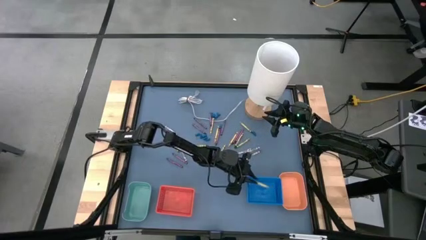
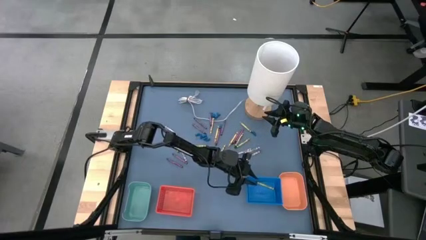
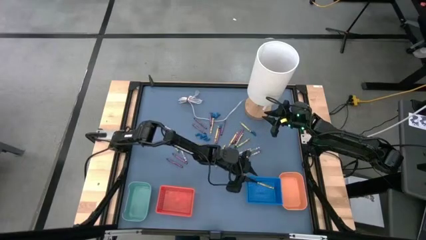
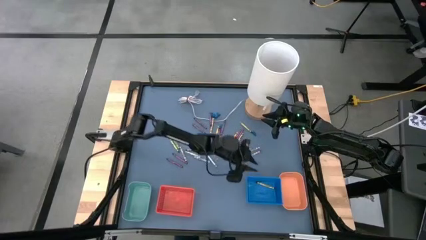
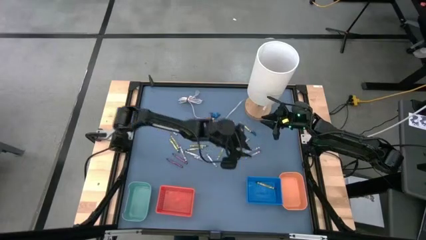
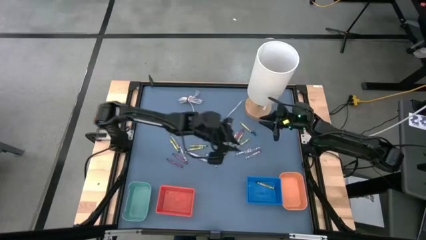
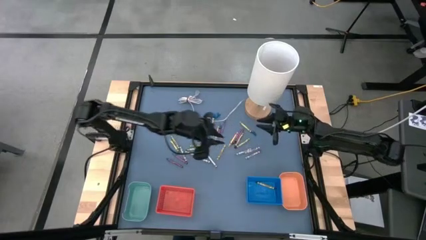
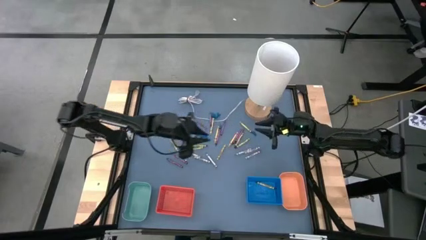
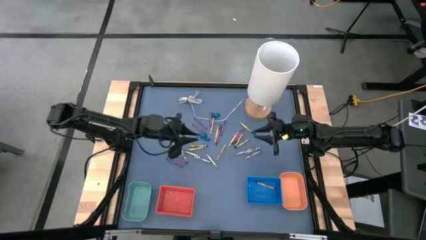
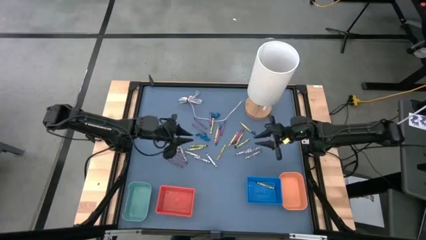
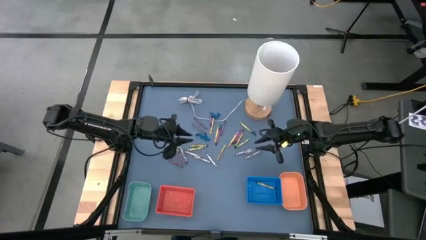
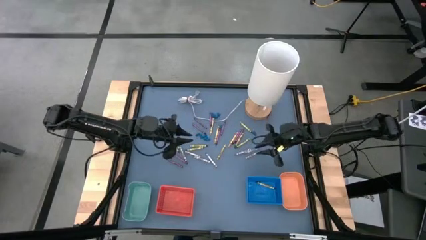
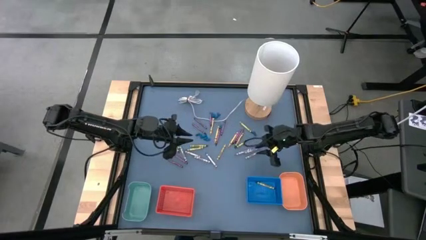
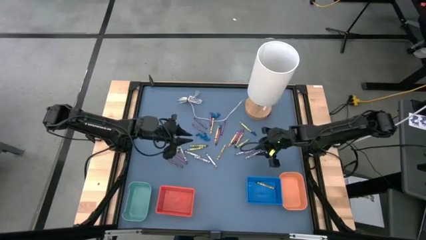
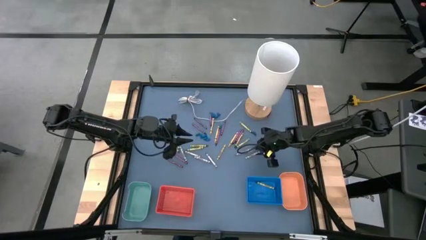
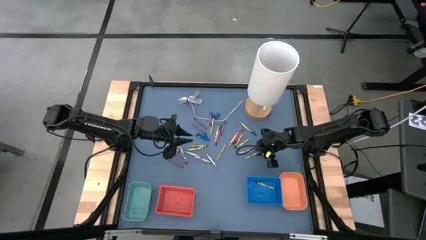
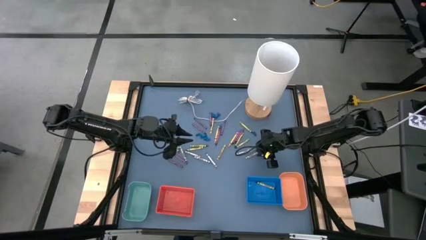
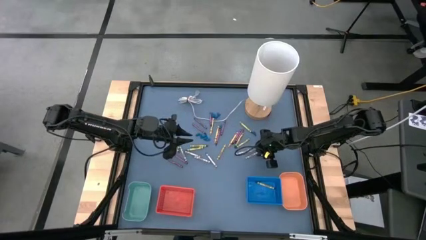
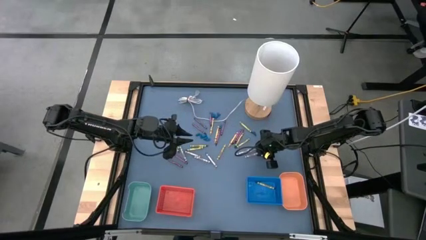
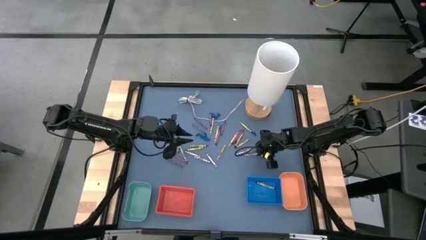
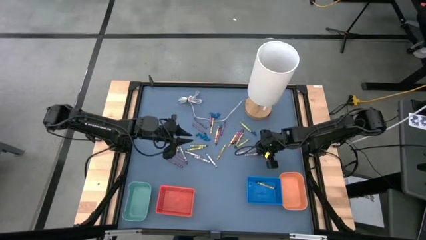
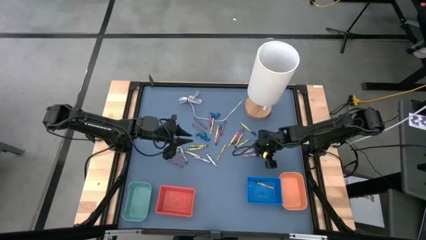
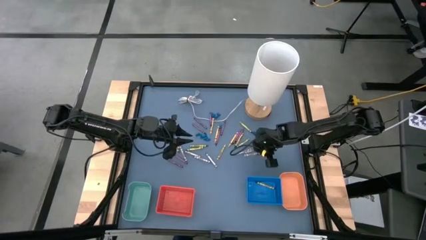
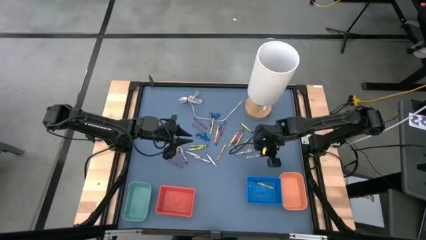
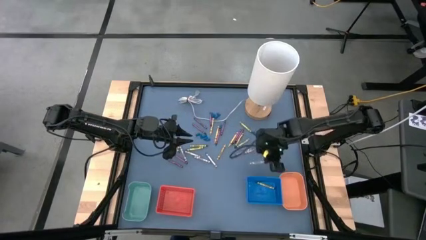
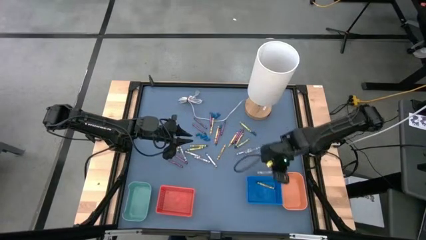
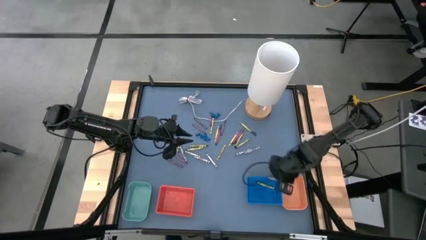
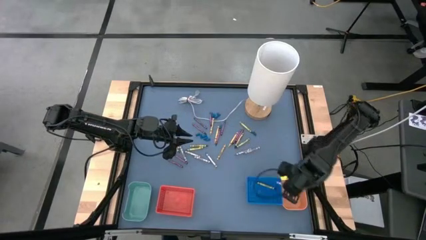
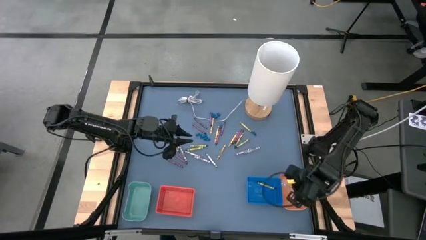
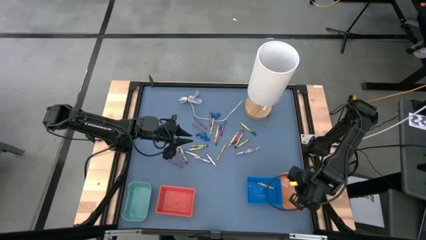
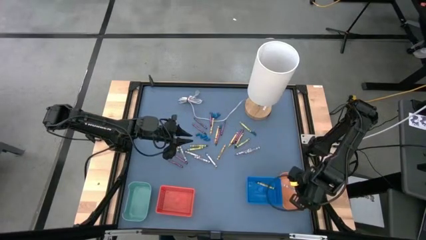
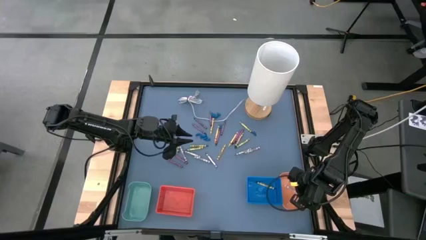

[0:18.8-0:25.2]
Task: Sort crayons
Put the gray crayon into the orange bin

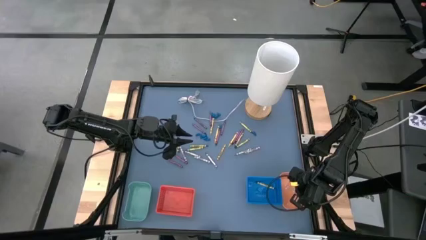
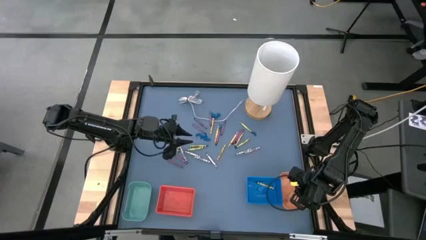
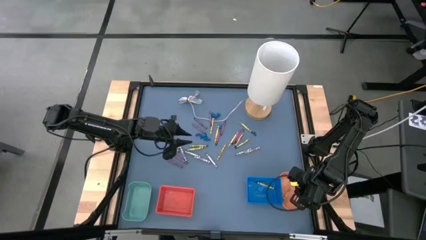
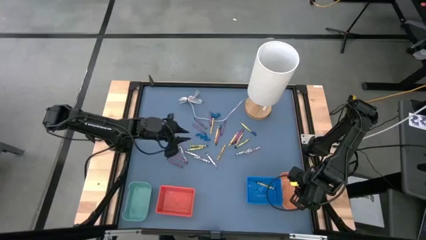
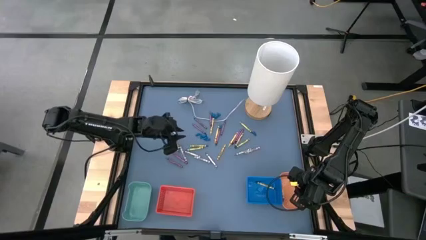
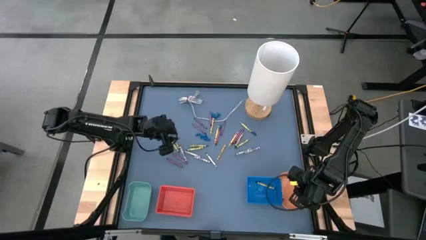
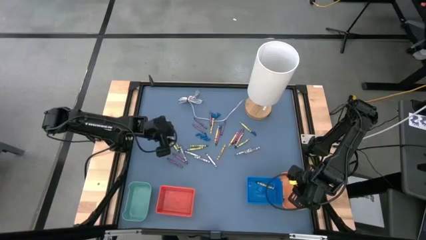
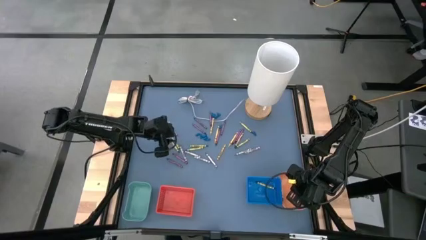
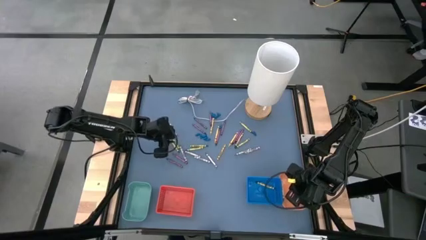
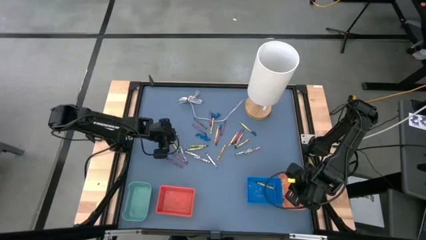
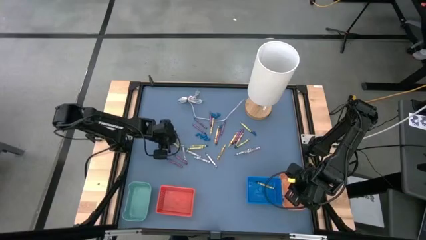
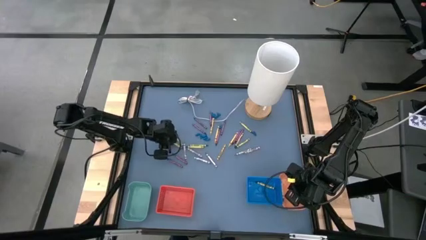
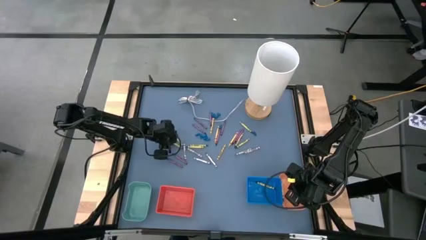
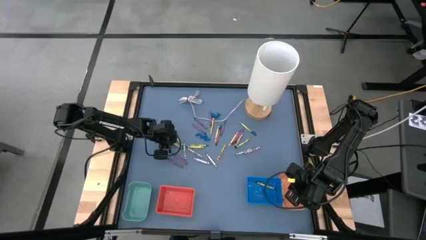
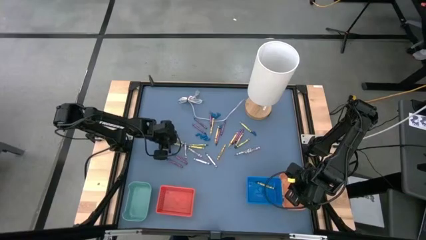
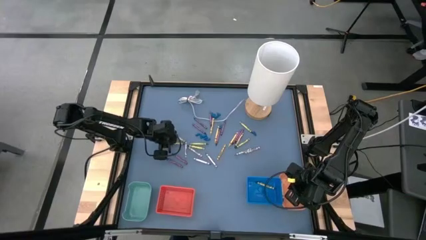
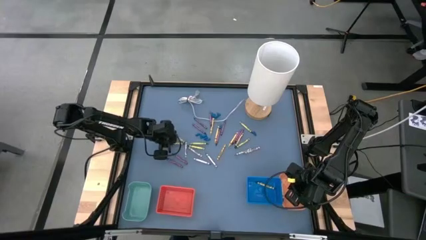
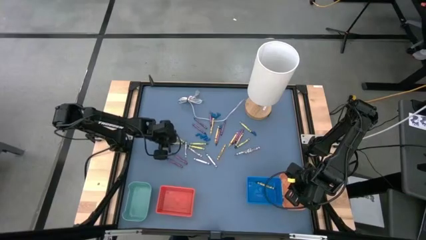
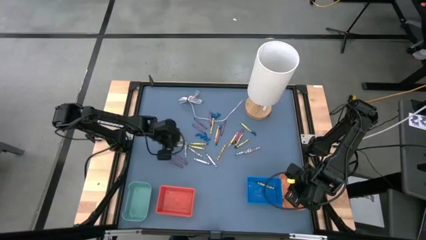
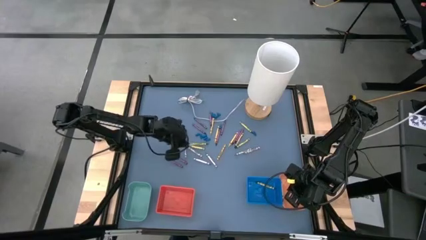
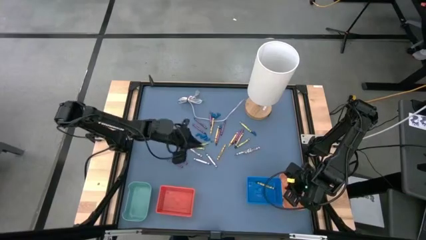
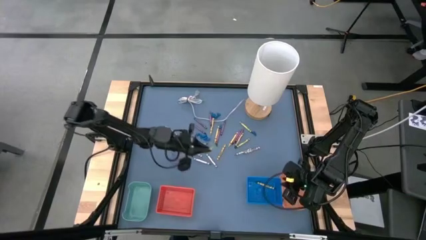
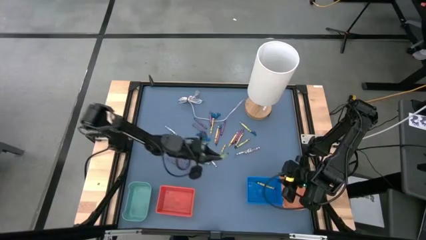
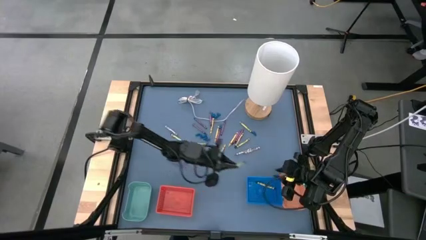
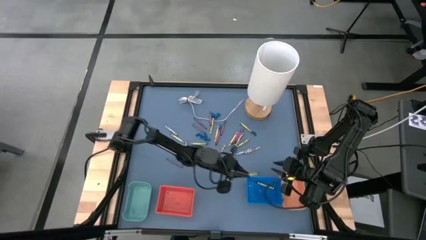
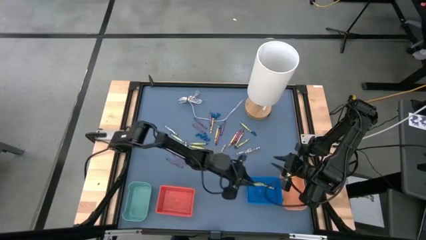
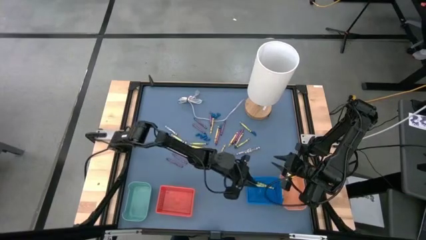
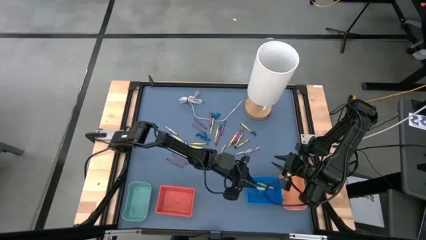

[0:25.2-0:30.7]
Put the green crayon into the blue basket

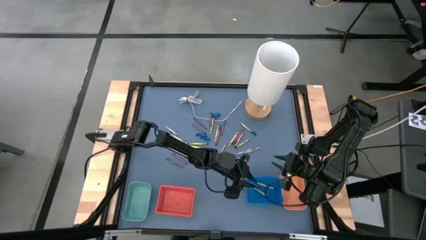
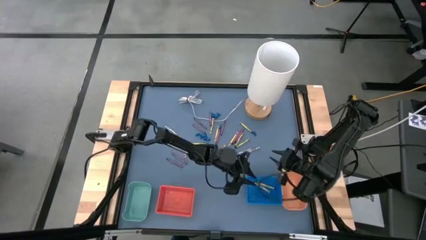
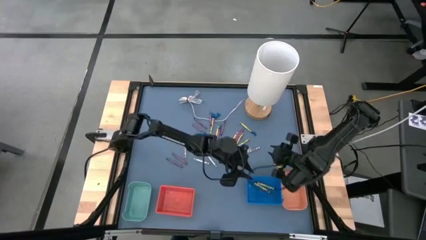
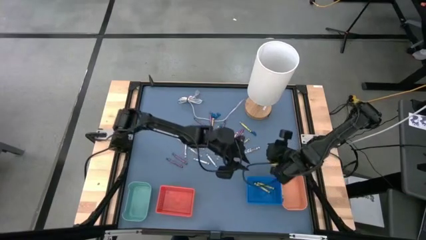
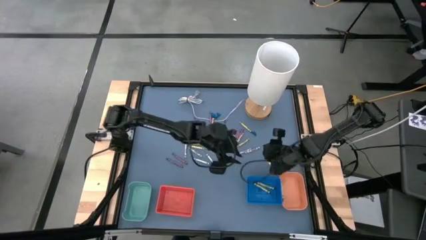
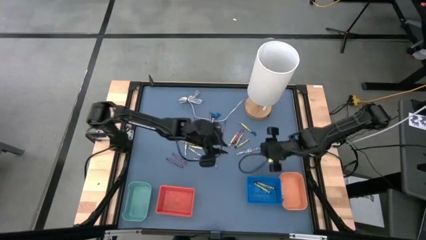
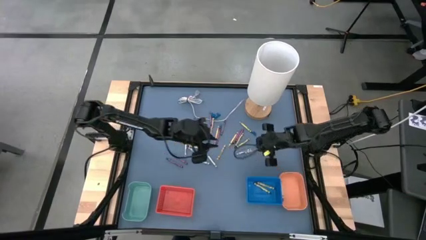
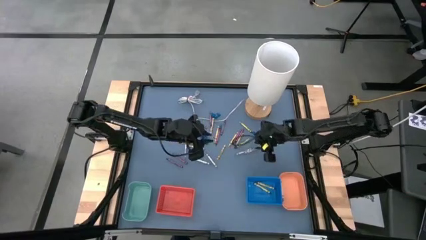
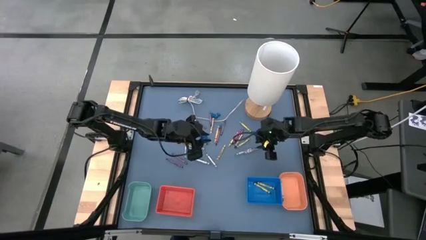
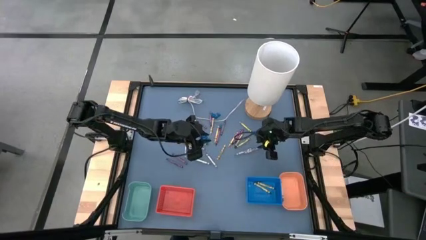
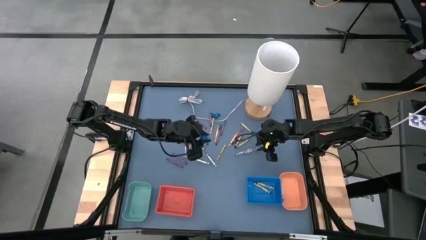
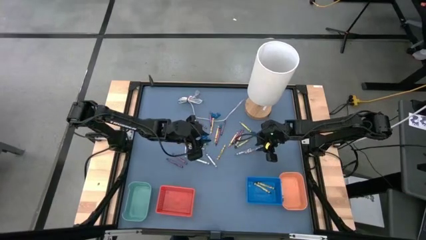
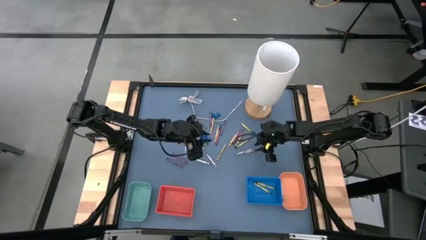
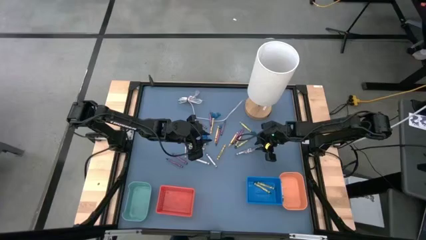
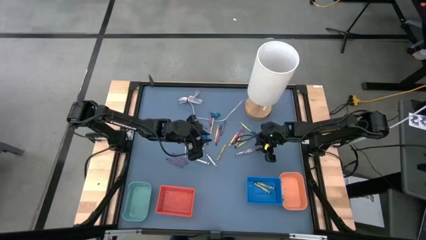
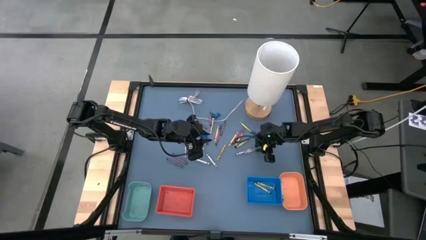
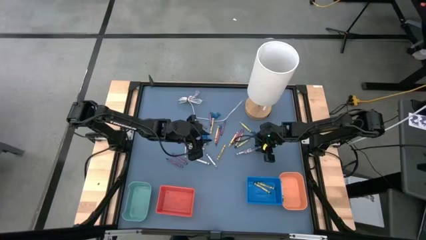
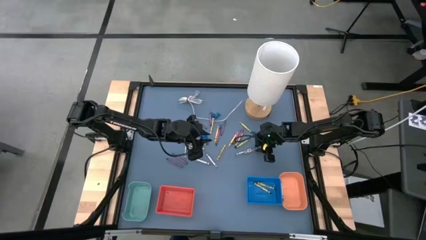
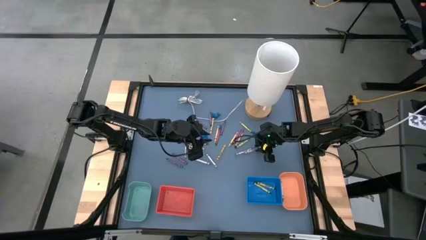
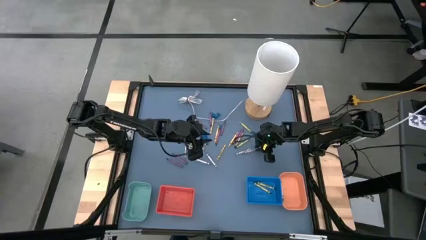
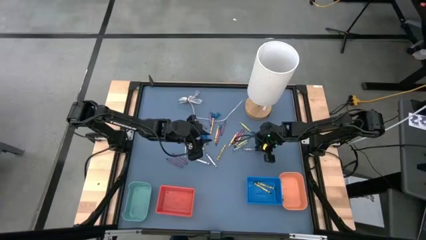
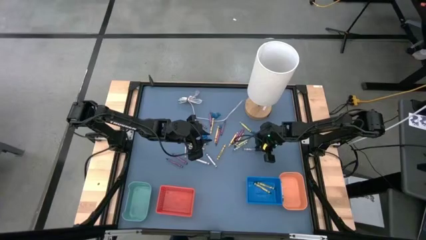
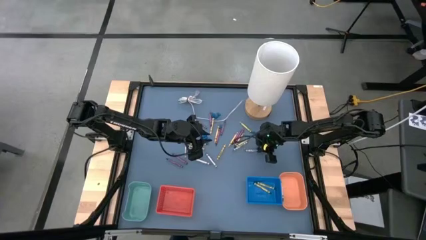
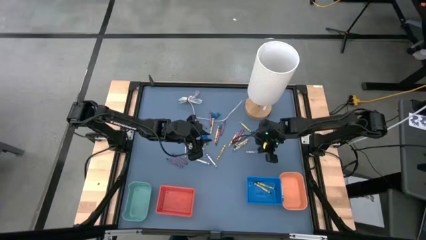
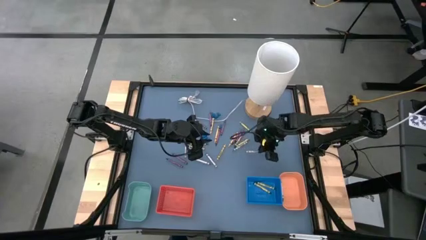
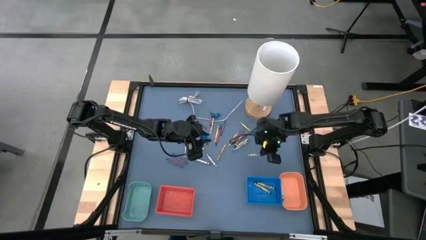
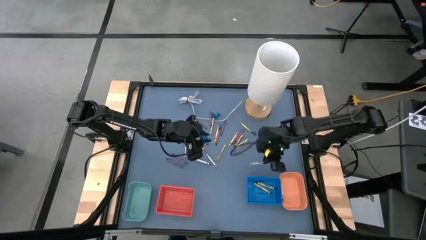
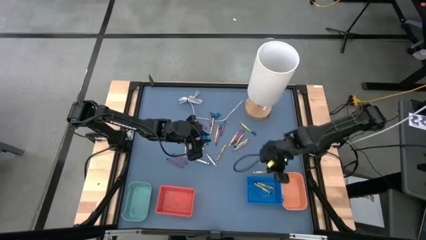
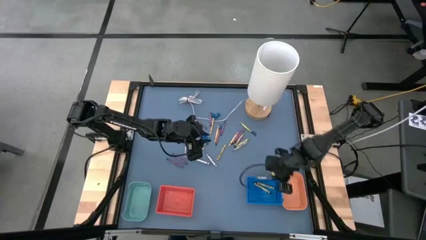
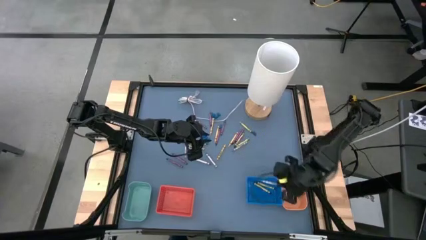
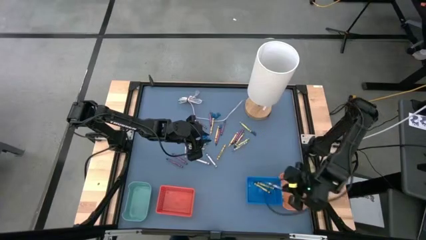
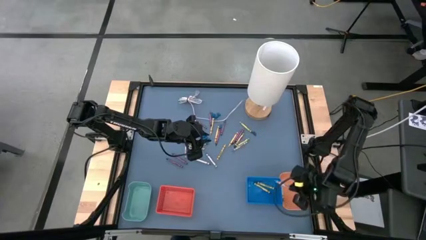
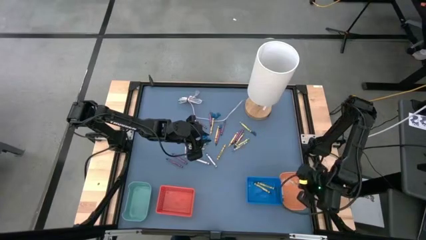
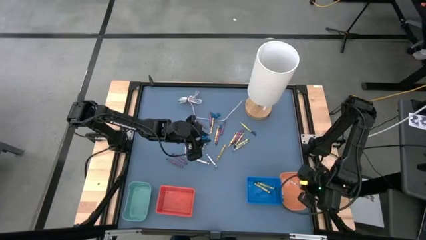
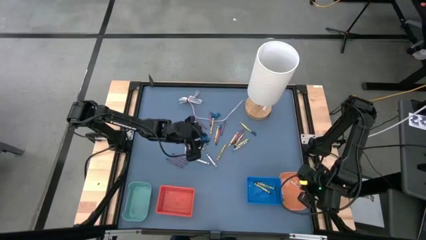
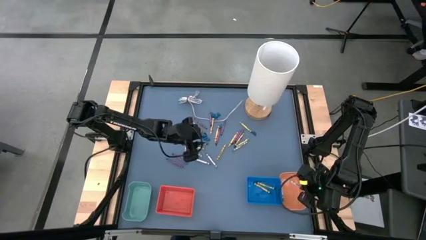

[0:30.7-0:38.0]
Put the gray crayon into the orange bin
